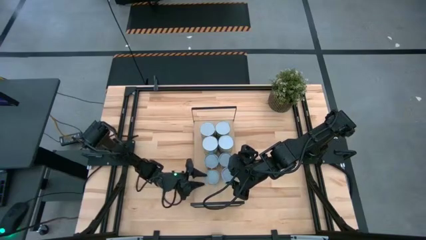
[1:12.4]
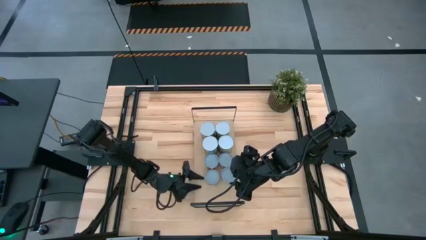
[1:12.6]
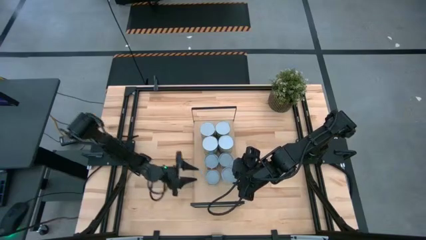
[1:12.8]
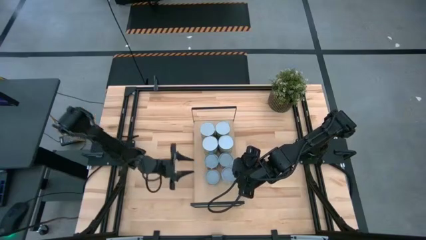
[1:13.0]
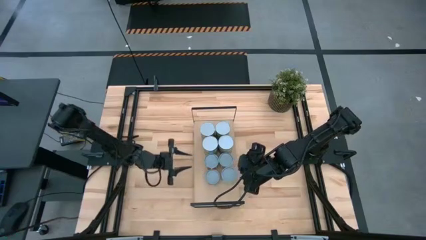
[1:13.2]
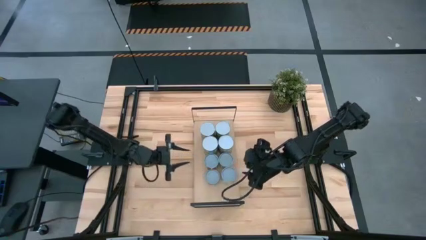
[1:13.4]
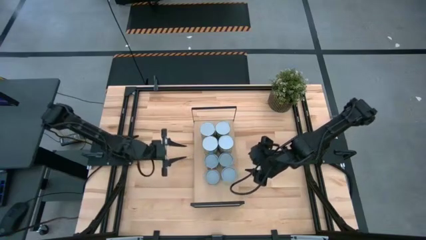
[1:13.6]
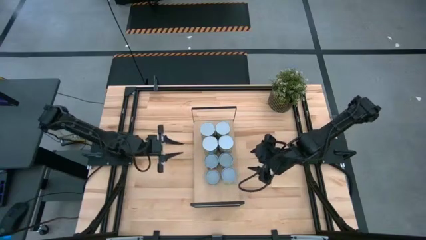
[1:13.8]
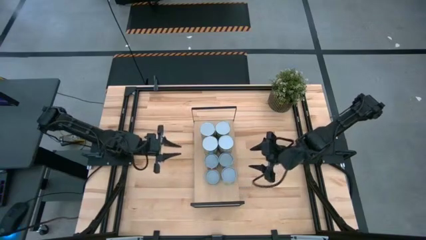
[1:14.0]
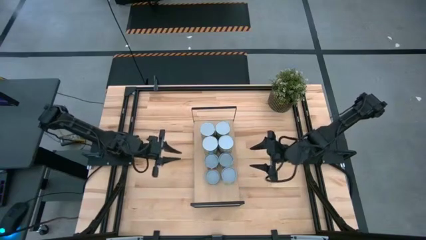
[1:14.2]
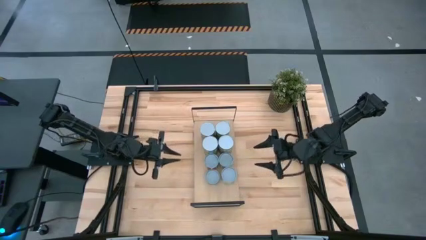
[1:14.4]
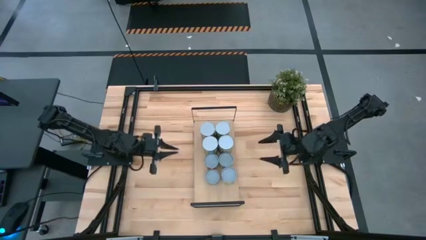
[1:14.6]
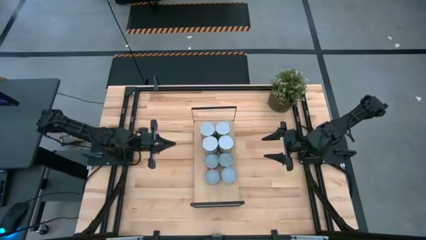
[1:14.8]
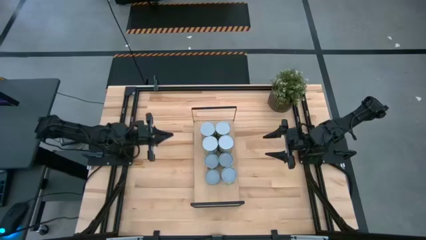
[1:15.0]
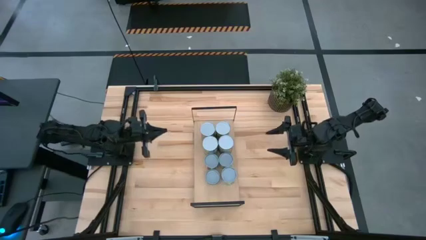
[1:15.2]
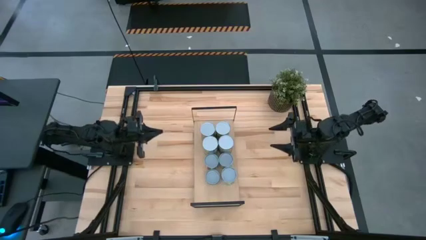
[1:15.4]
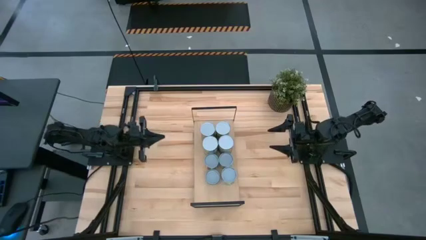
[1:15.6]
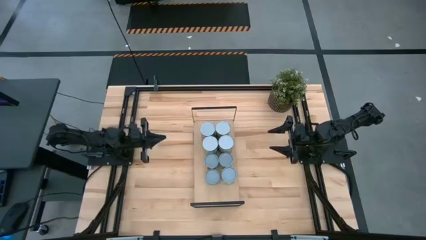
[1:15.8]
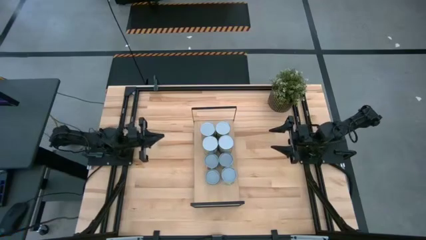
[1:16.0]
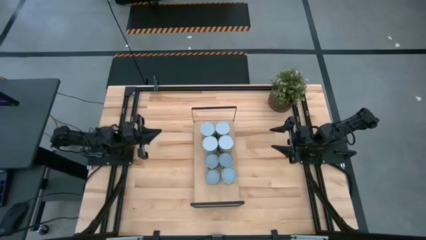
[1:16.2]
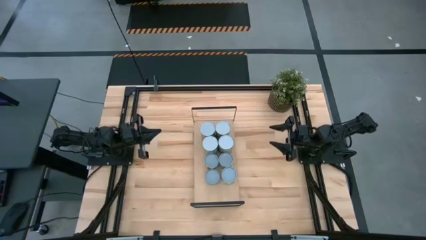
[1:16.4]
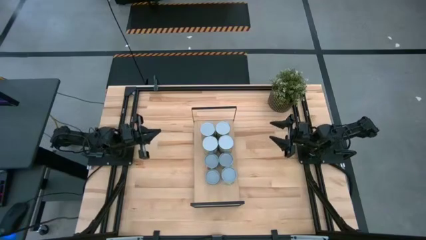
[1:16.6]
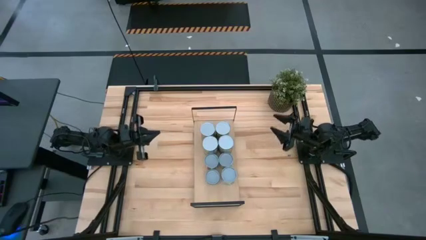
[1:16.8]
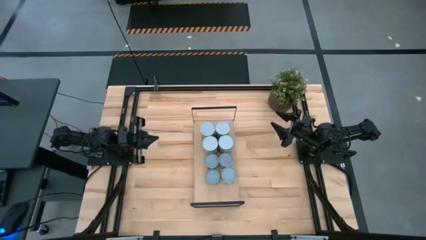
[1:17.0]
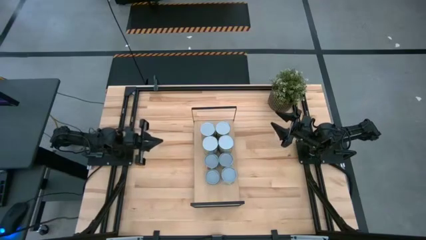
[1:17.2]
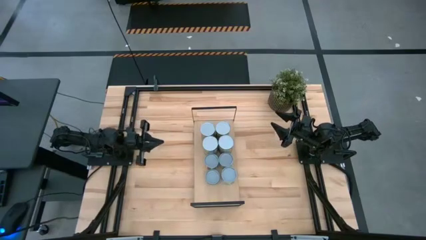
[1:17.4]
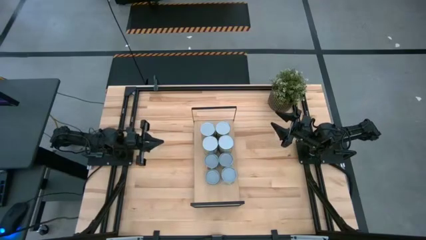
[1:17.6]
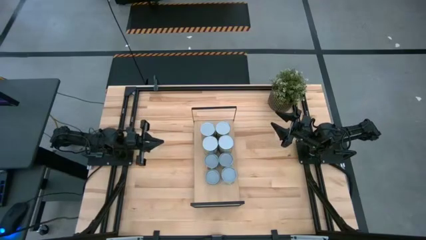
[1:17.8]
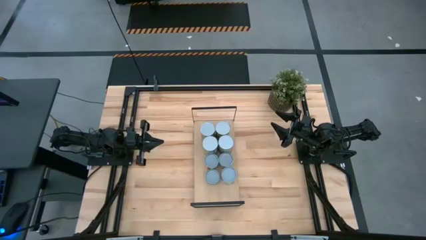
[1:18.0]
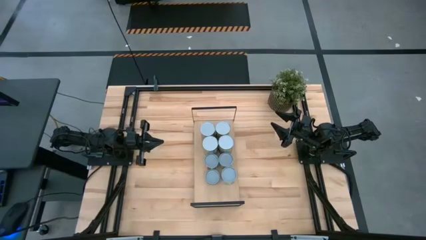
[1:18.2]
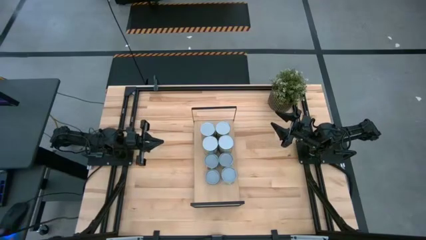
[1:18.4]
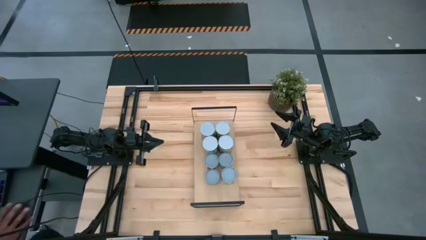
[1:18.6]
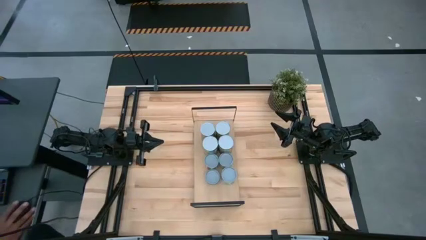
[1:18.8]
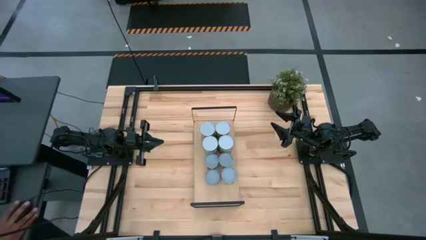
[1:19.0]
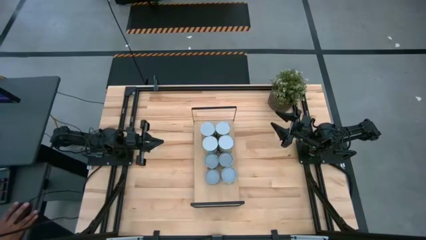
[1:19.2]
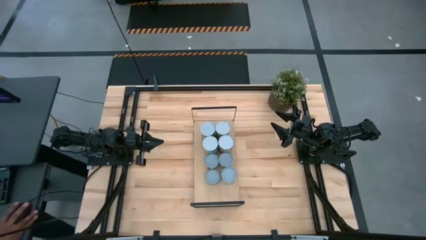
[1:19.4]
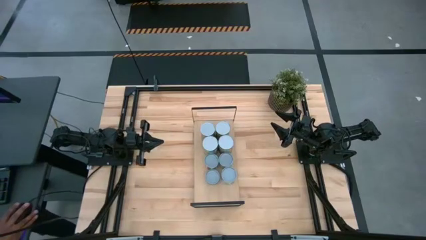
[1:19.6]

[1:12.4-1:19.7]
Task: Pick and place cans onto a shelf
Return to Home Position

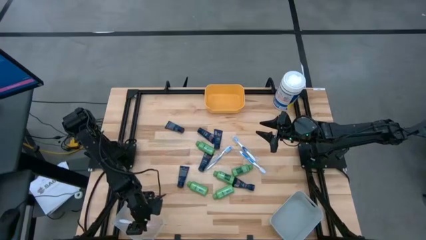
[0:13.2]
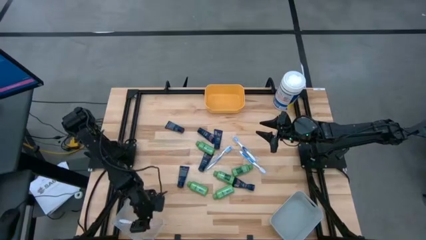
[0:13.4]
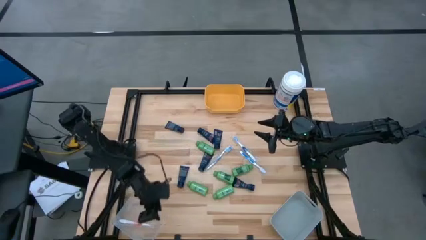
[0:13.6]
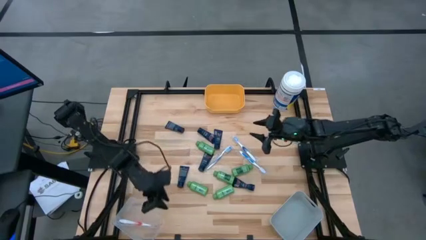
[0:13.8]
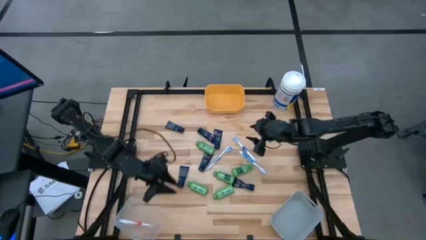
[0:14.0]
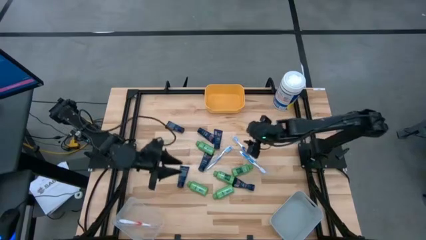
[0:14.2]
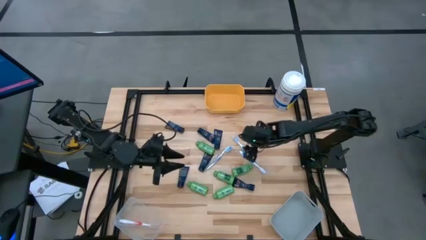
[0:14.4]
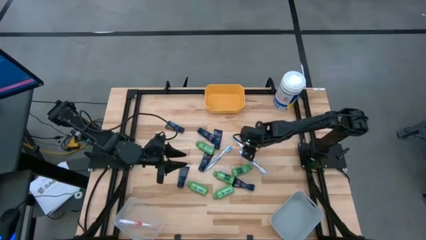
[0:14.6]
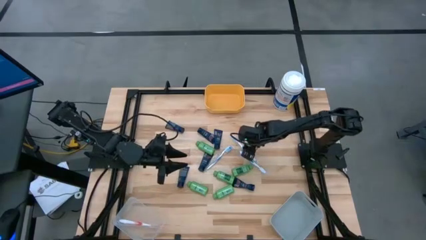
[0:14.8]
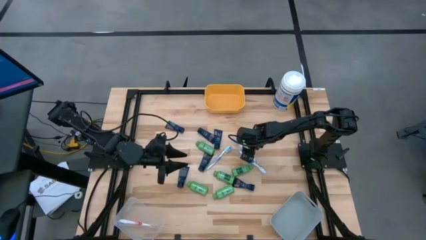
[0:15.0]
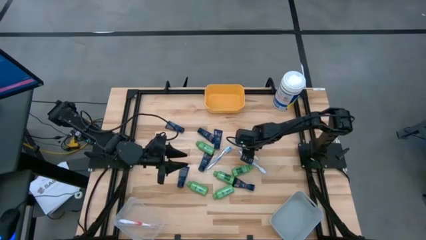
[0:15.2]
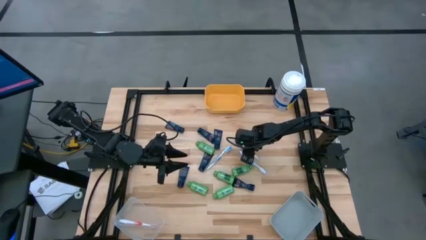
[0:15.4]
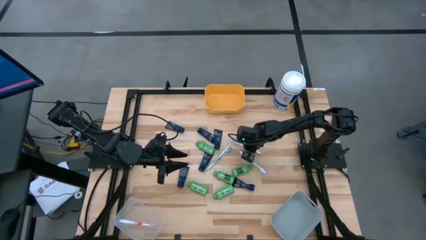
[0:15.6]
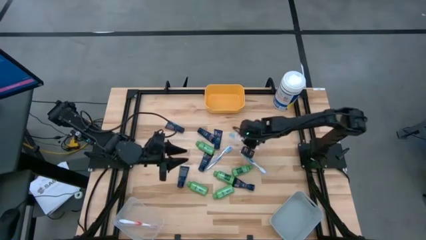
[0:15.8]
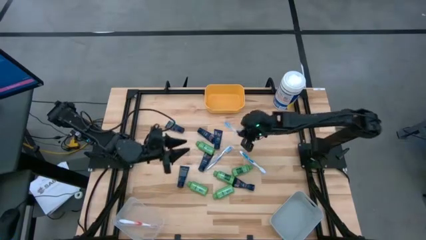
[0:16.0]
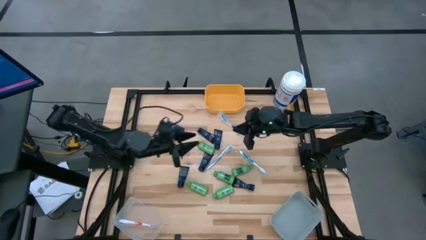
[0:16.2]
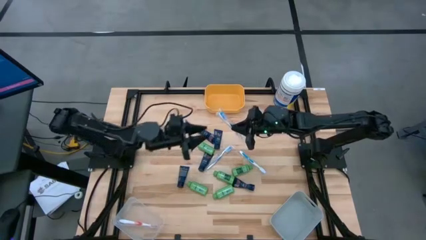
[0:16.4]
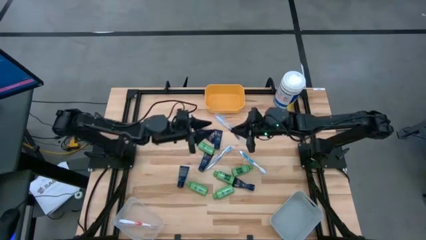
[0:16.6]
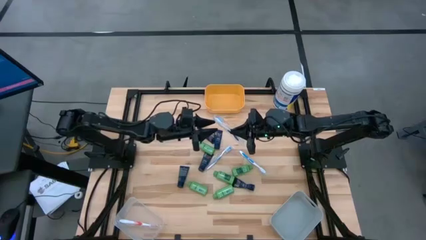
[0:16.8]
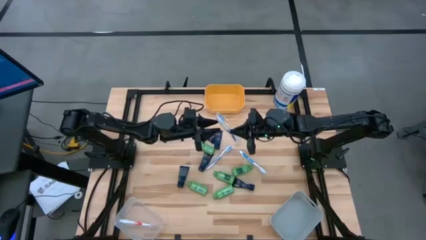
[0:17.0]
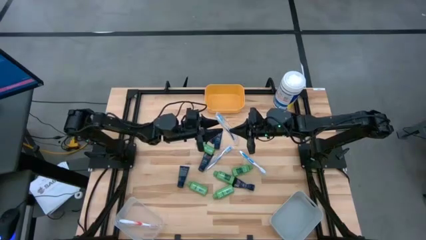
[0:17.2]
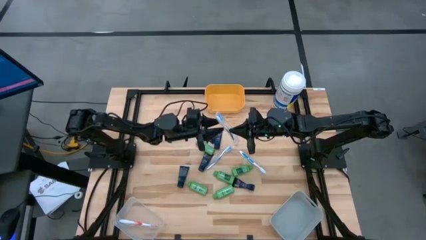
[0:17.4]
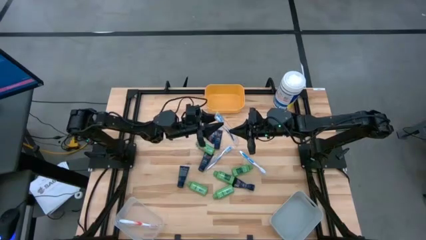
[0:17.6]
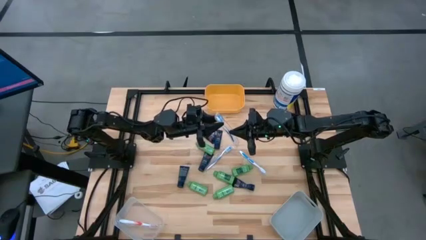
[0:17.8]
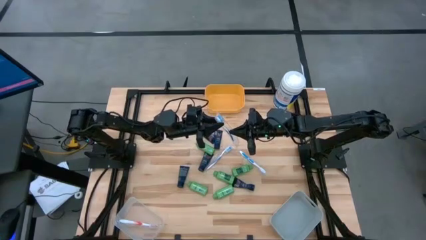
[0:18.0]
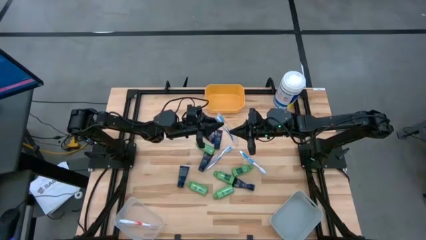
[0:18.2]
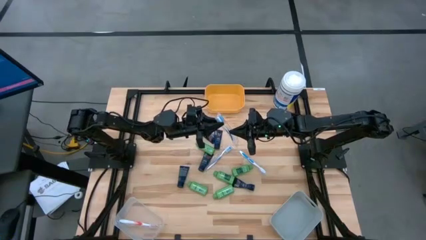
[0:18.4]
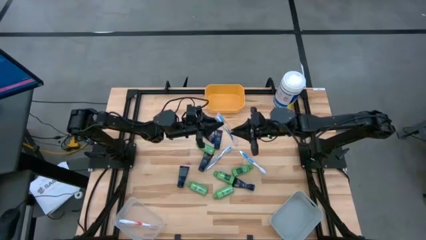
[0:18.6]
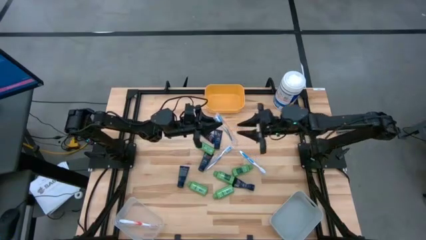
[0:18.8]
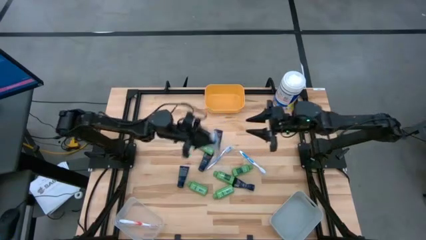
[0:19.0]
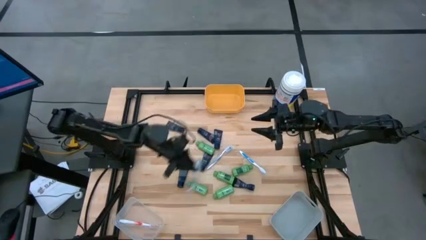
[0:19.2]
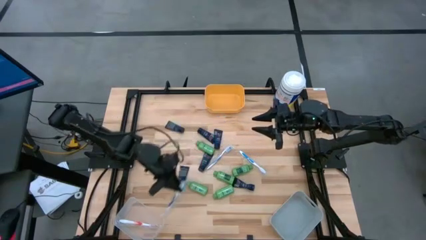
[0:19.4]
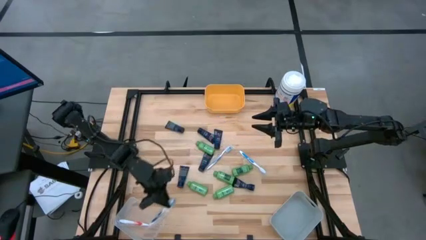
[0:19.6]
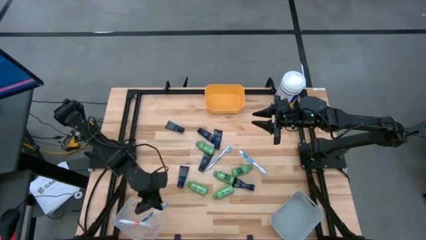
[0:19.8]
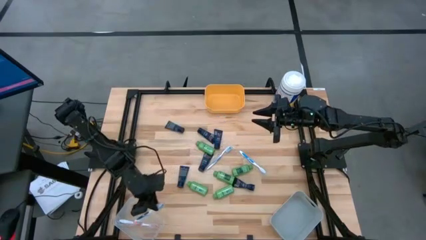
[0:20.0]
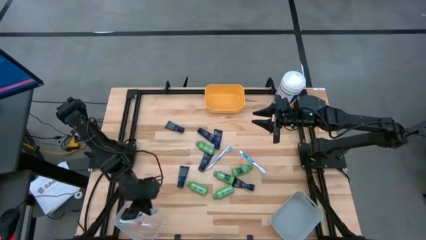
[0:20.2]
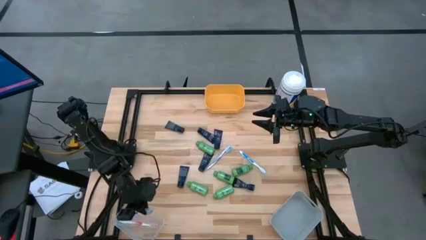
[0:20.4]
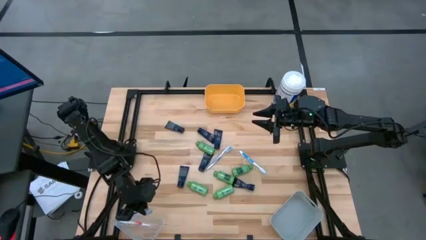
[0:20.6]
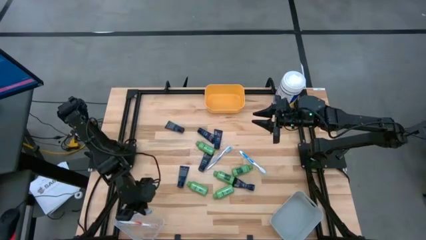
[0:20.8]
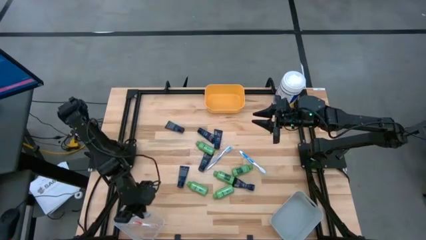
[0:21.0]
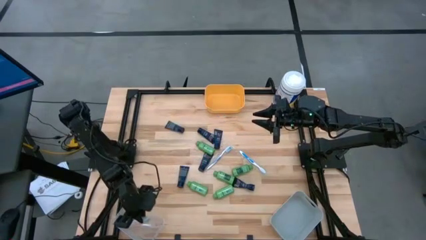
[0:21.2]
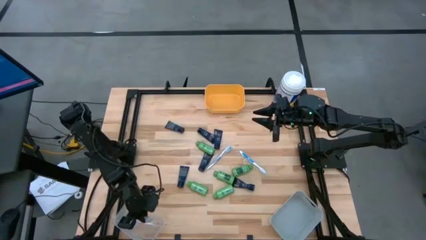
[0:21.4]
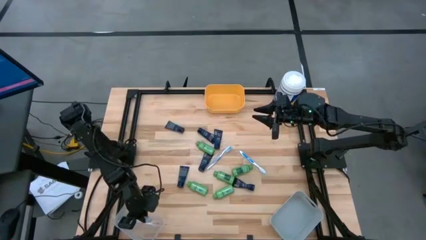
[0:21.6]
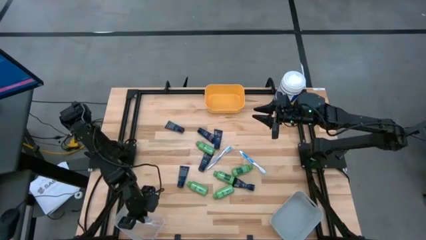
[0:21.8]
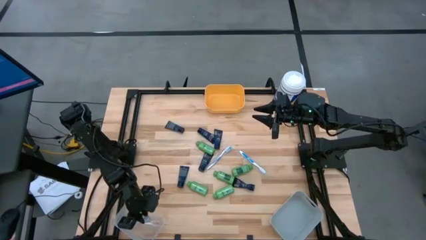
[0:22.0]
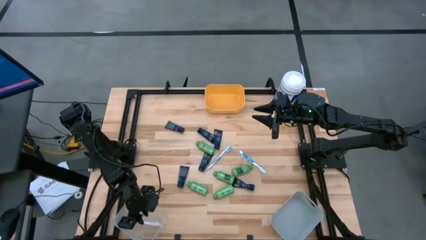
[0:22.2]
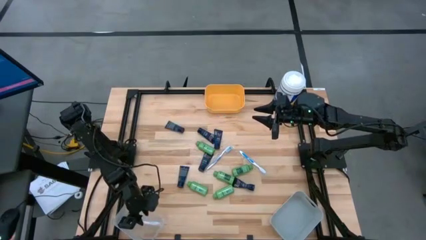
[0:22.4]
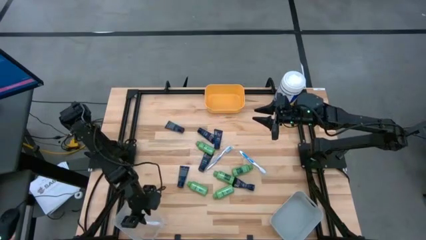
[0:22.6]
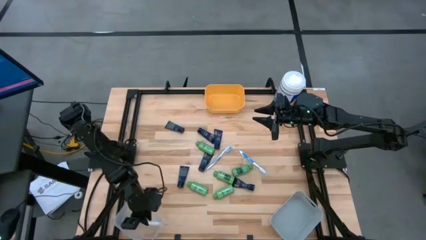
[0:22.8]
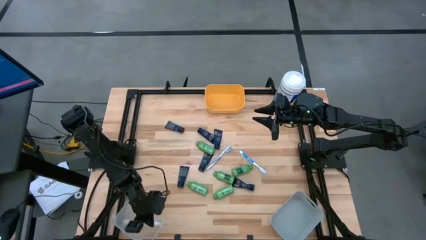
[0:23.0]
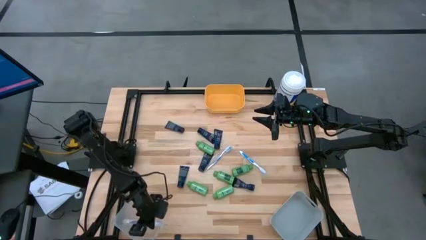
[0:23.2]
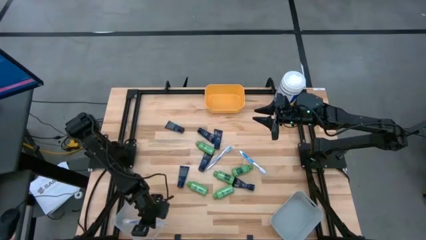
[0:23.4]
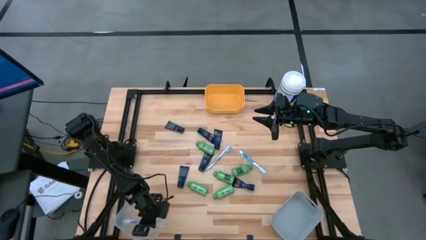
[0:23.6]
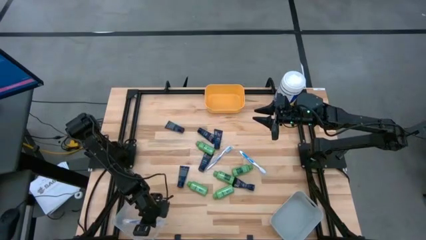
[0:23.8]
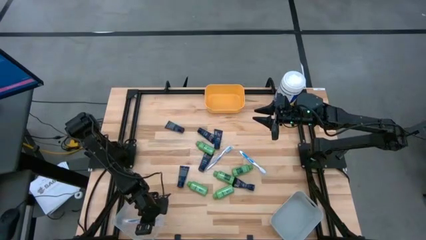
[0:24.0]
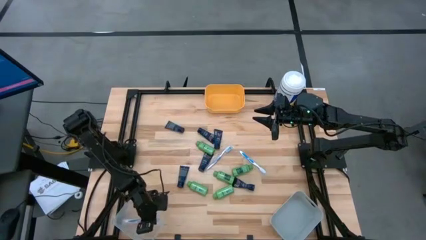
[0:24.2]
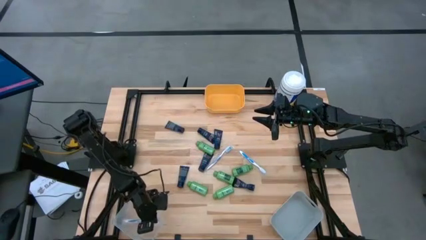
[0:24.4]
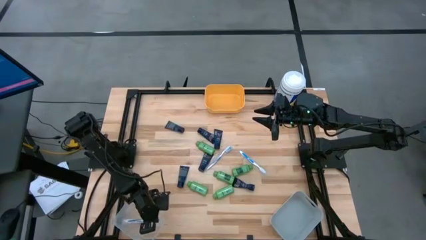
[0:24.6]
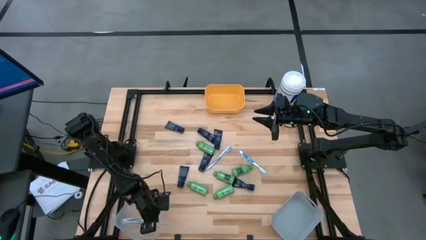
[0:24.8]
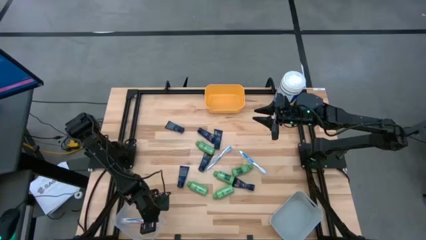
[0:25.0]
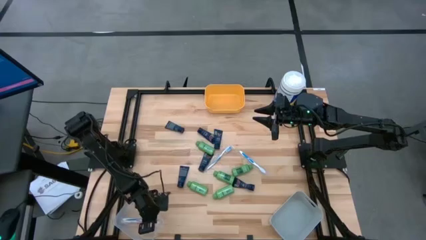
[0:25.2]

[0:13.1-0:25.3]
Task: Pick & Place Travel size toiletries
Put the blue toothbrush into the transparent bin
